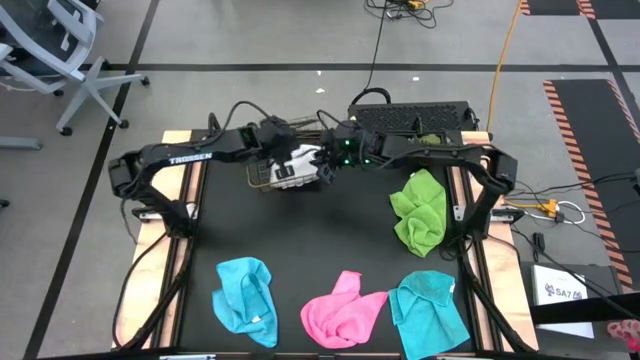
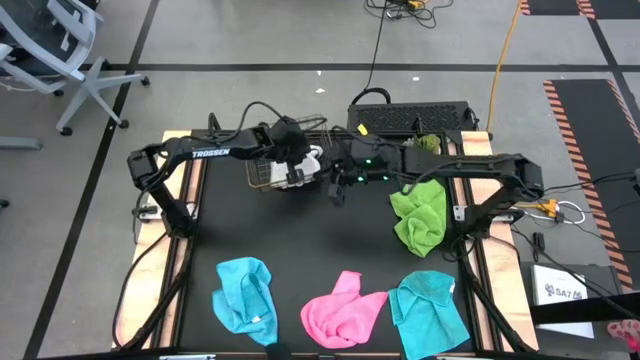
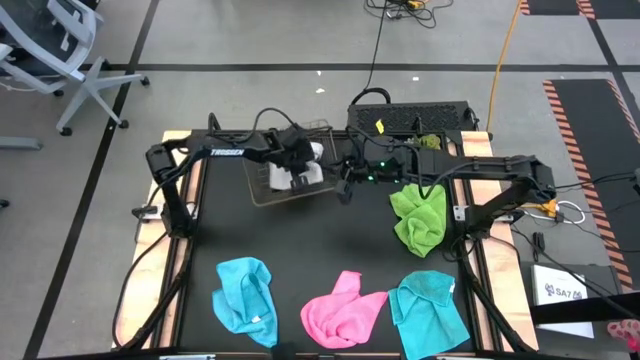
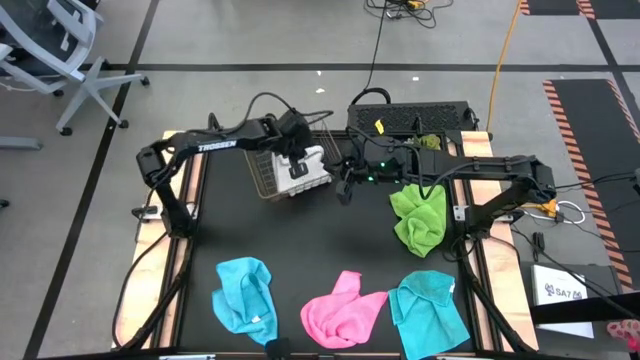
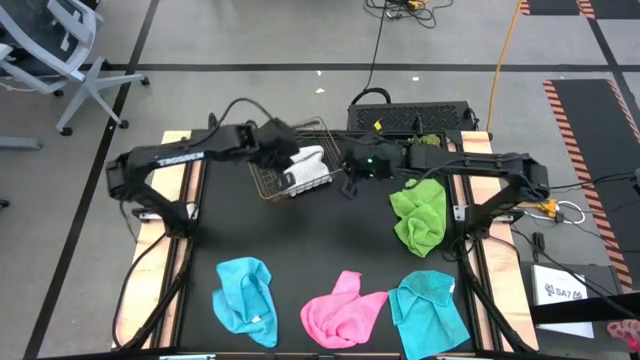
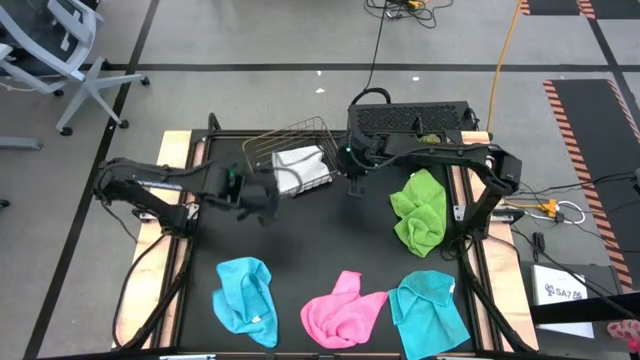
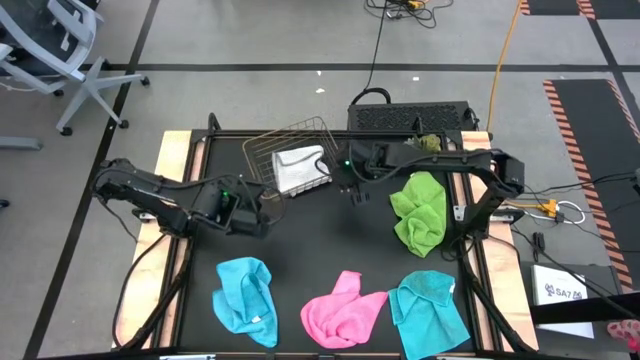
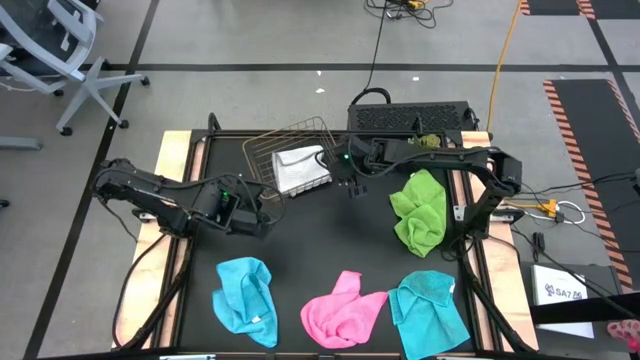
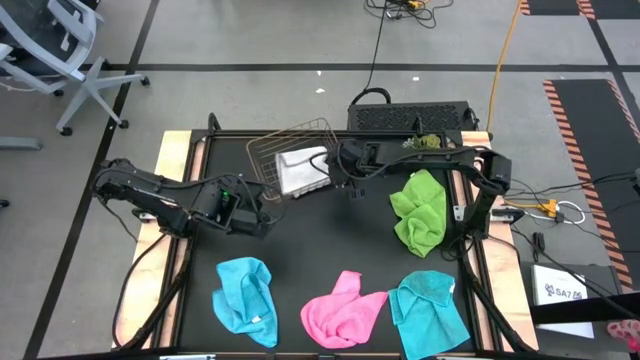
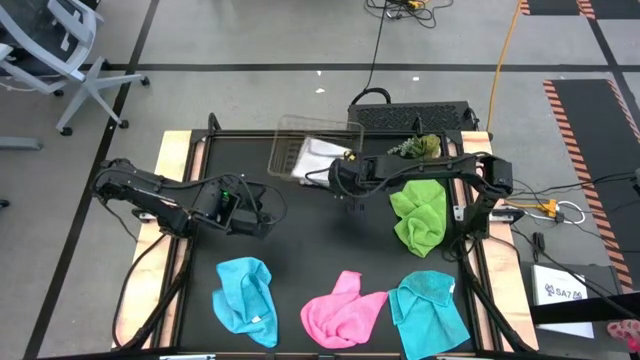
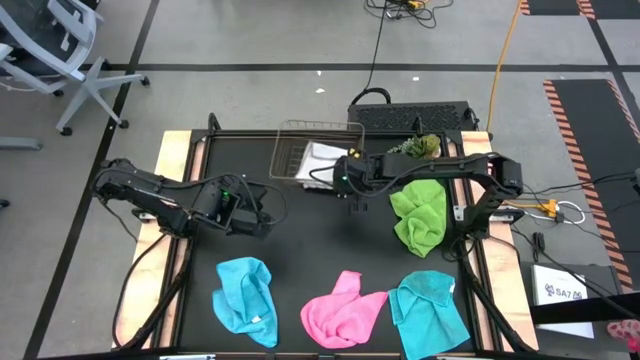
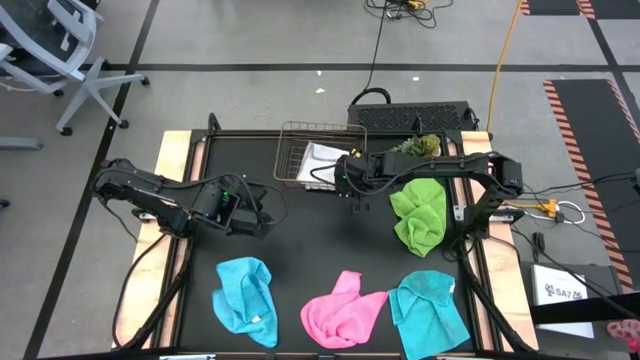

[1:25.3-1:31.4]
Task: Fold microfiber towels
Adjust the wire basket

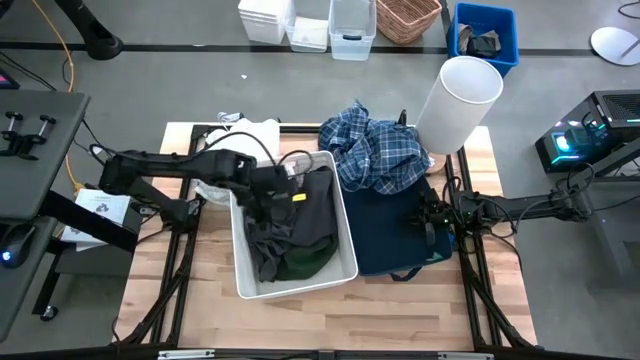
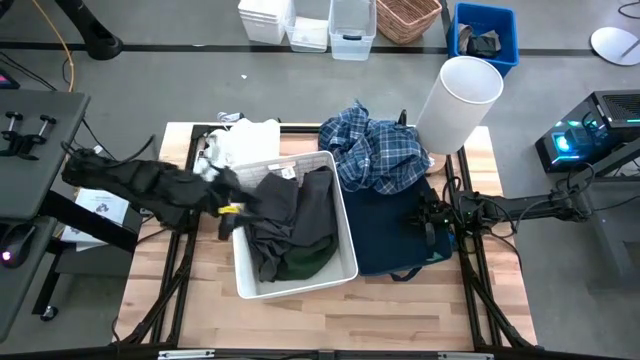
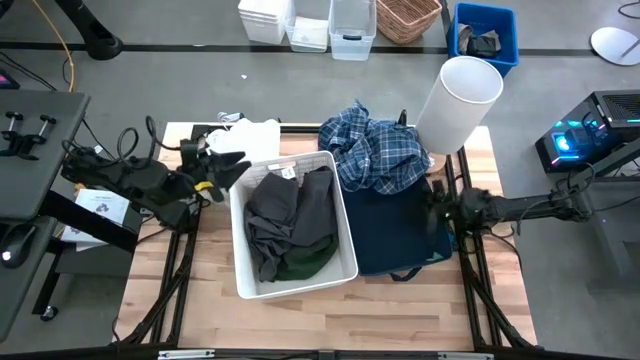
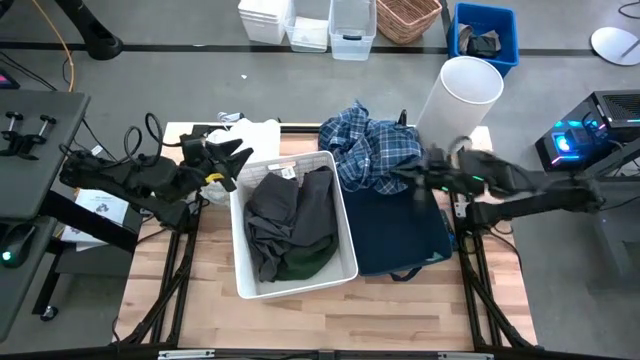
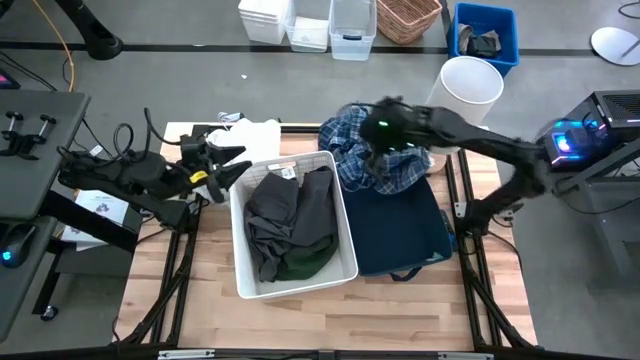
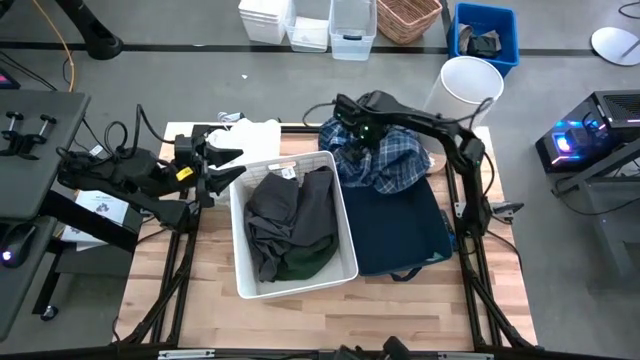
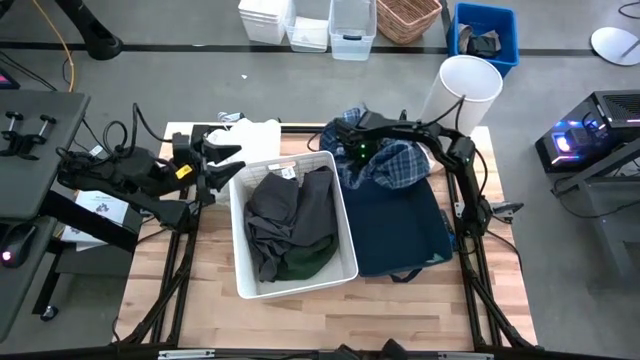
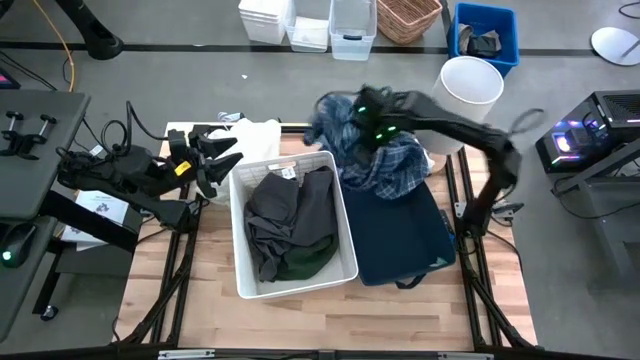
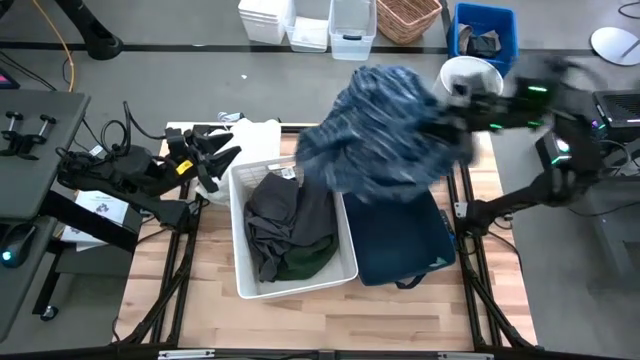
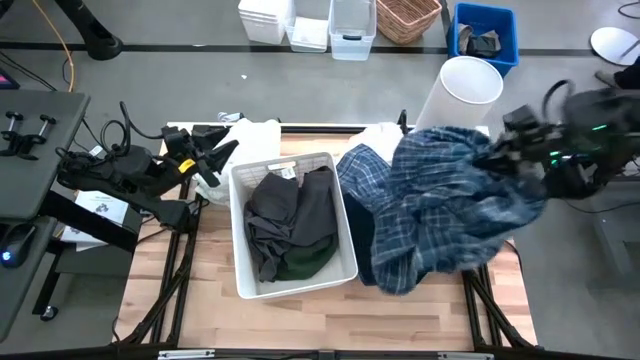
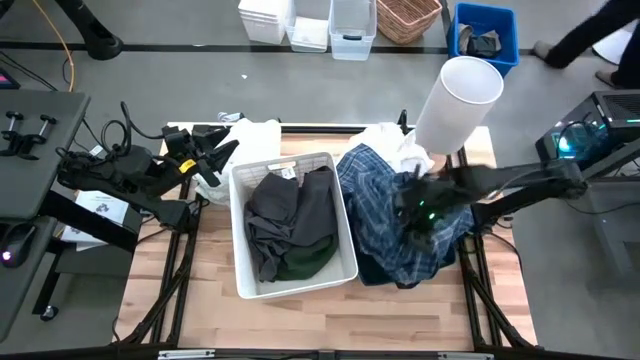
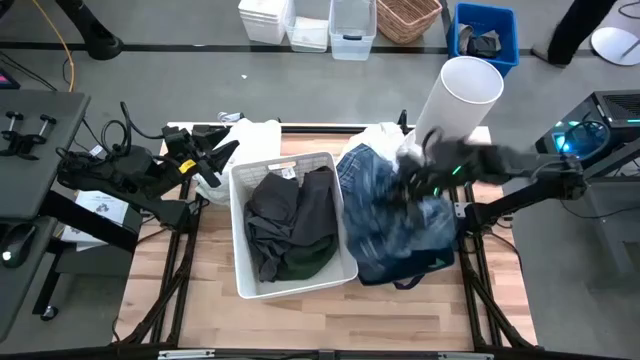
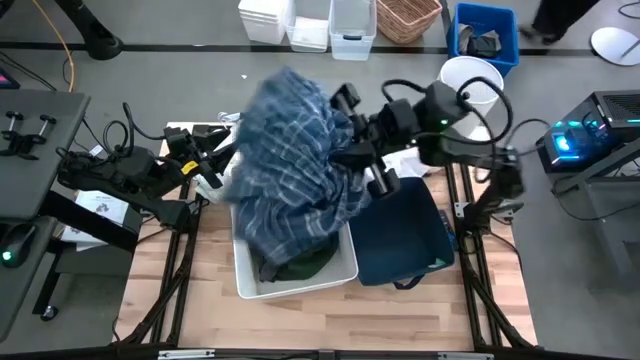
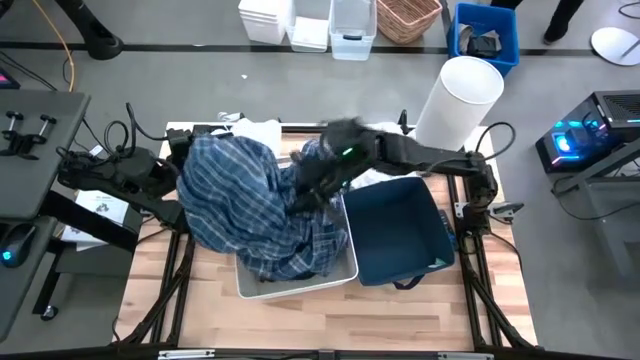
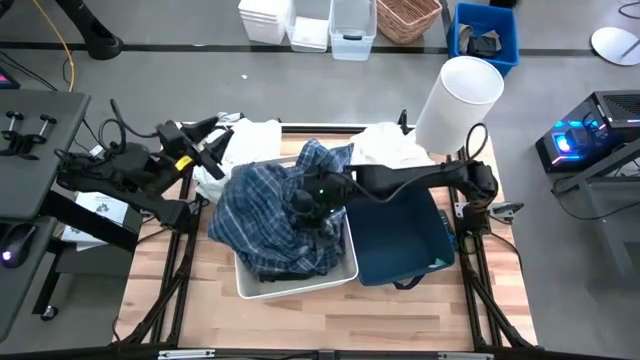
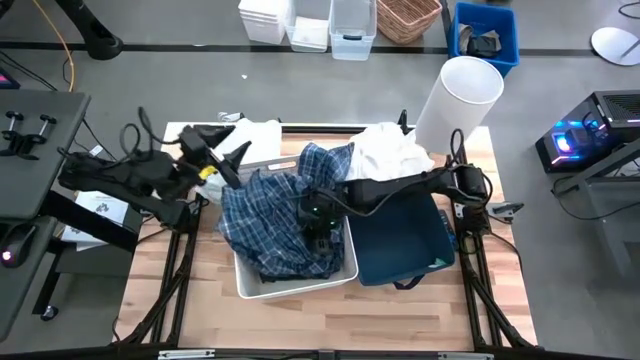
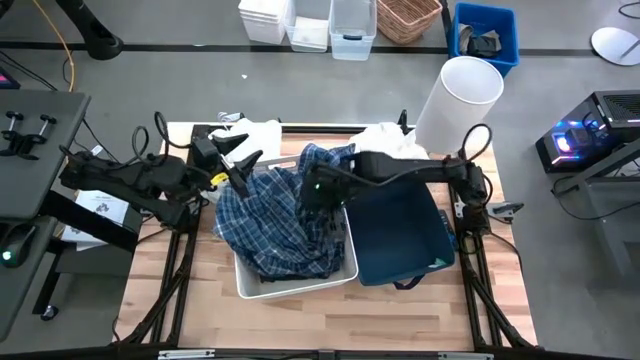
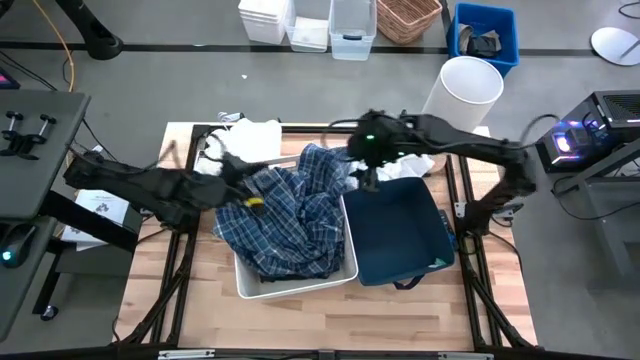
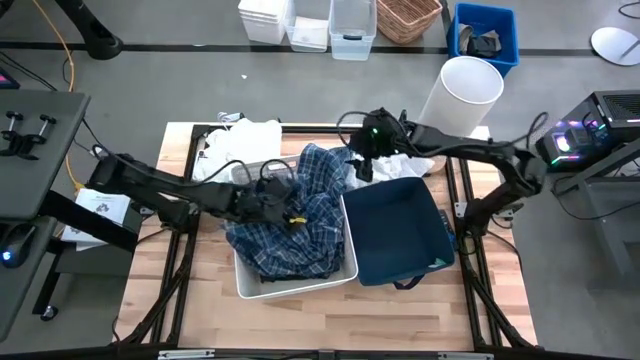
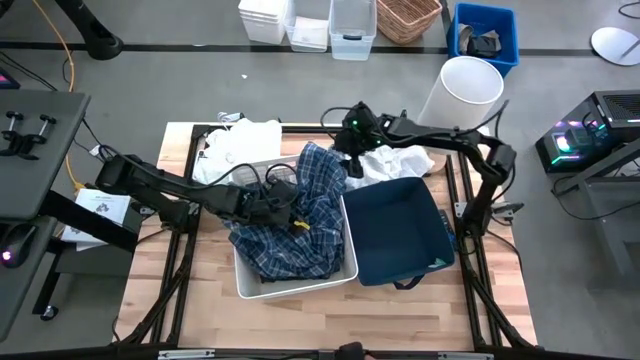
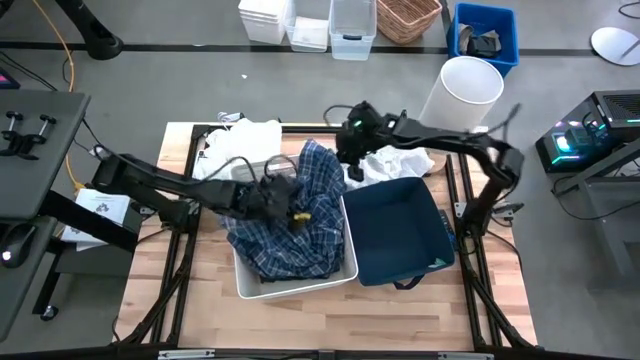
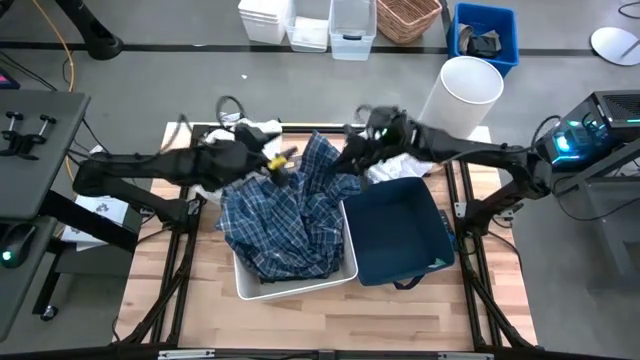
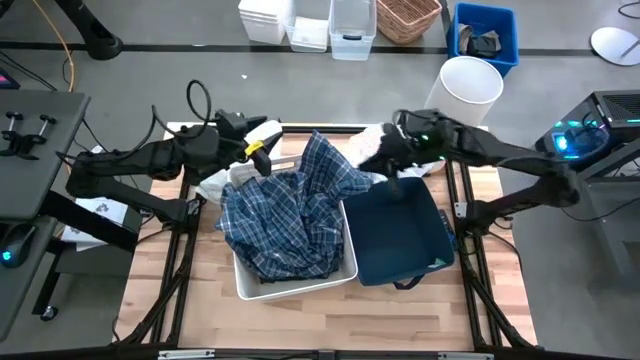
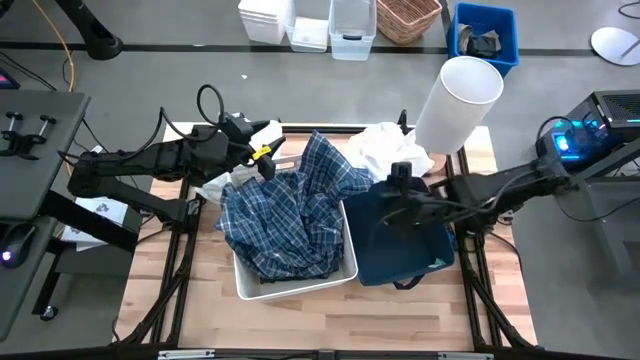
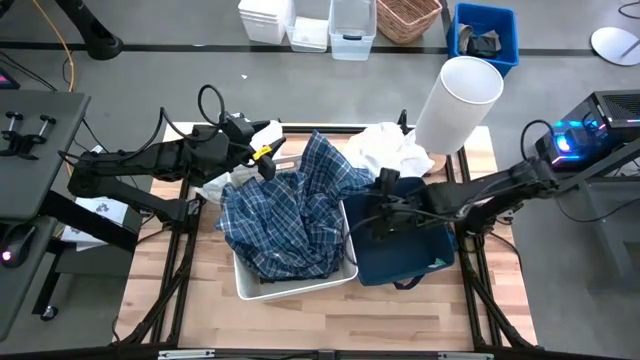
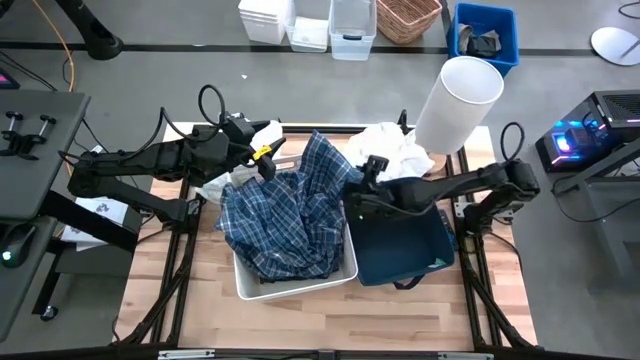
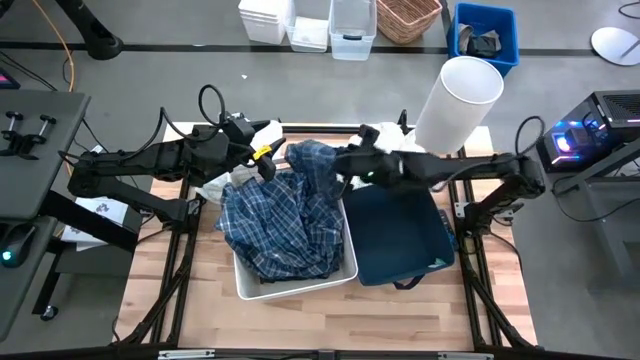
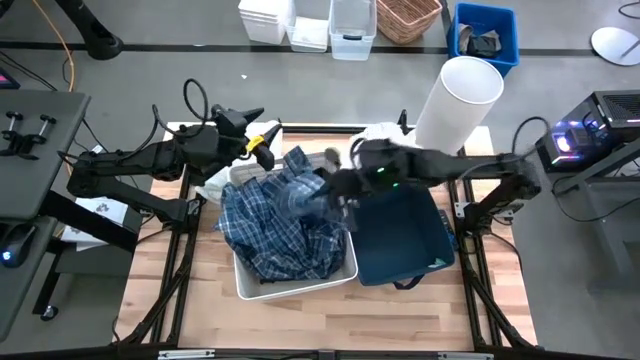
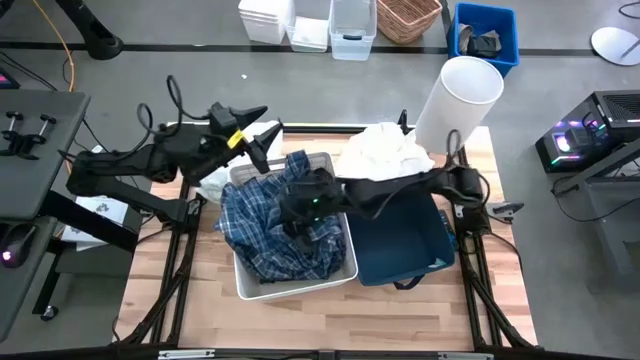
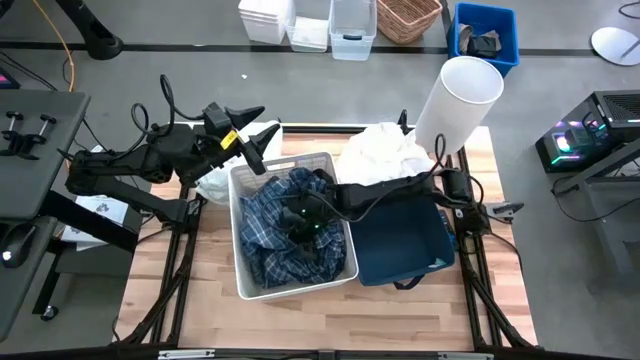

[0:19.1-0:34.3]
Task: Sort clothes
Put the long-sleeved blue patterned polo into the white laundry bin
